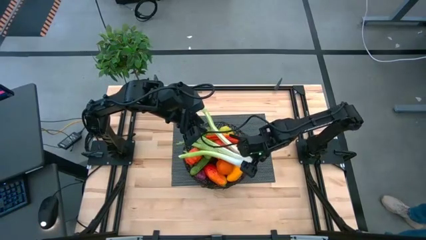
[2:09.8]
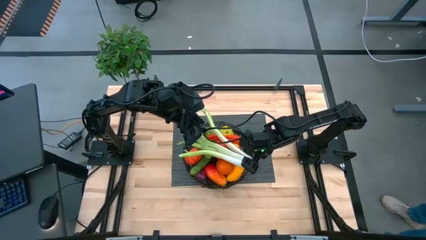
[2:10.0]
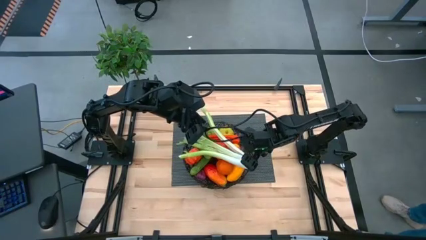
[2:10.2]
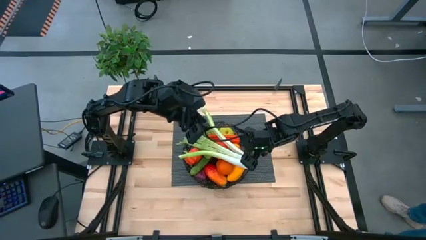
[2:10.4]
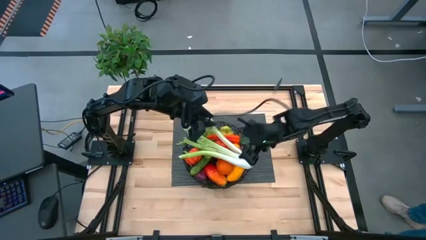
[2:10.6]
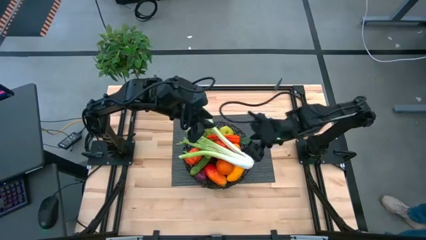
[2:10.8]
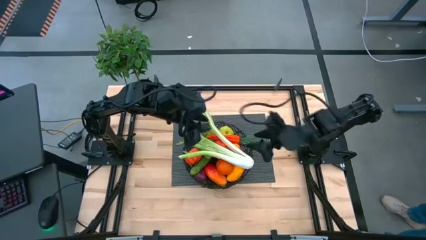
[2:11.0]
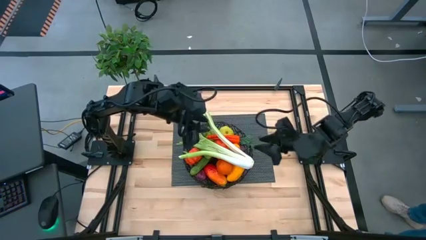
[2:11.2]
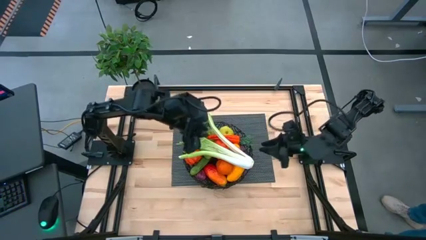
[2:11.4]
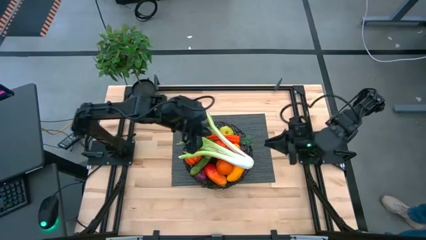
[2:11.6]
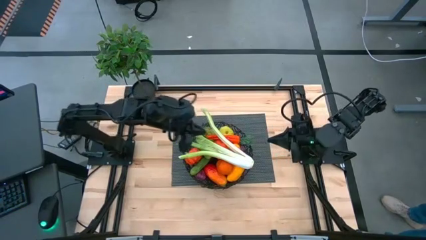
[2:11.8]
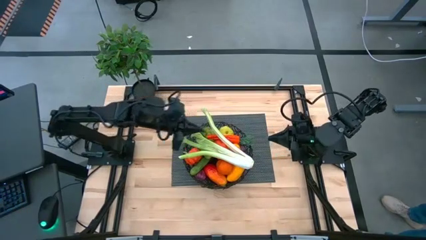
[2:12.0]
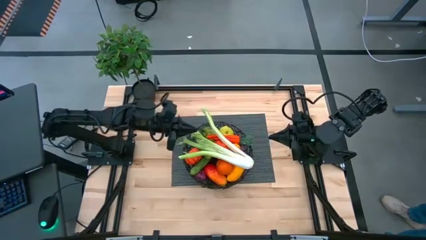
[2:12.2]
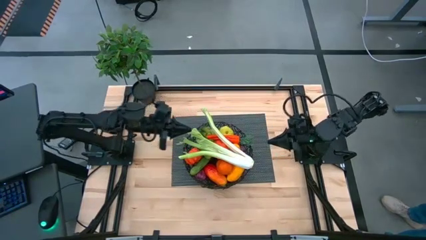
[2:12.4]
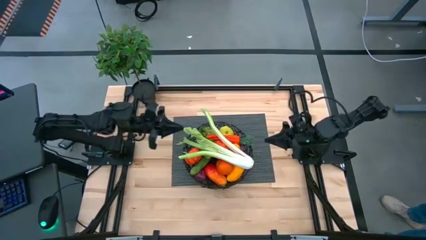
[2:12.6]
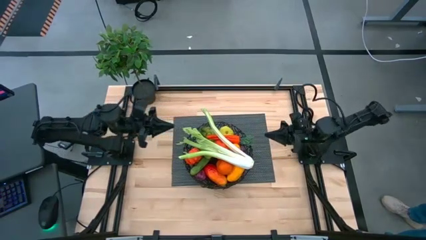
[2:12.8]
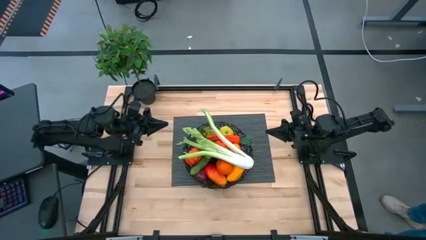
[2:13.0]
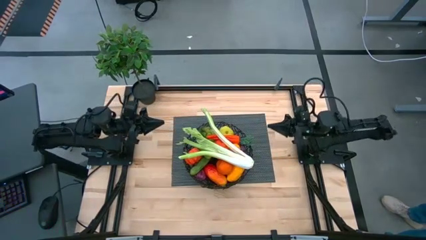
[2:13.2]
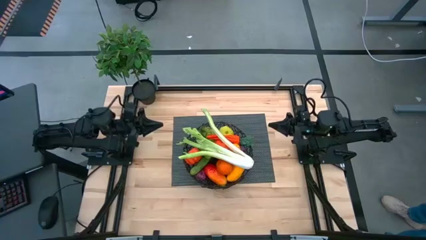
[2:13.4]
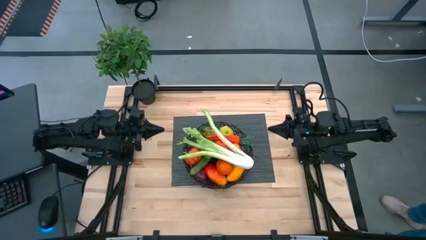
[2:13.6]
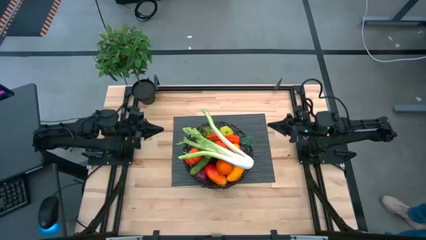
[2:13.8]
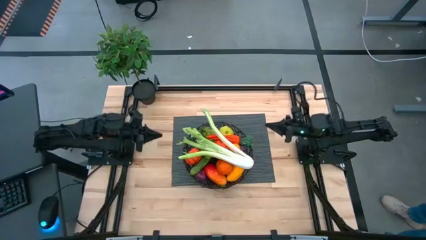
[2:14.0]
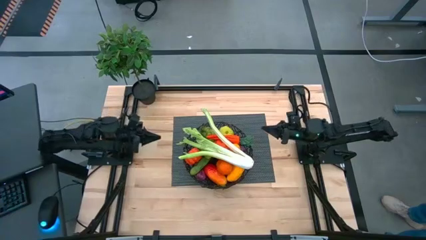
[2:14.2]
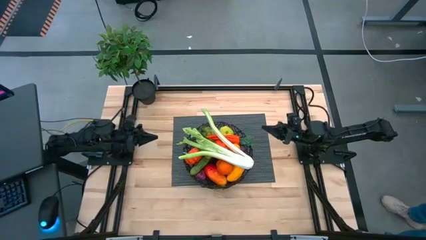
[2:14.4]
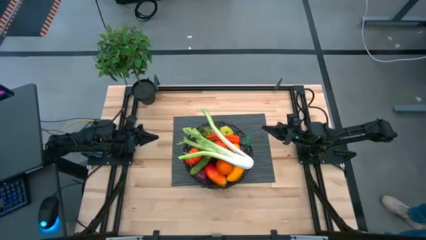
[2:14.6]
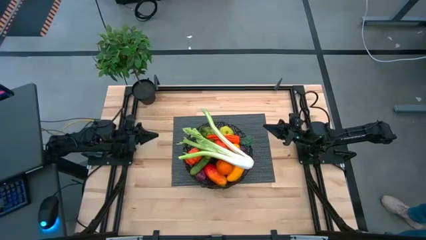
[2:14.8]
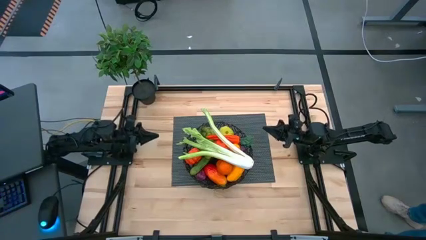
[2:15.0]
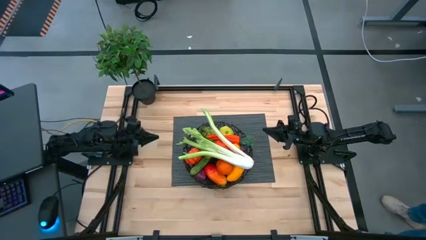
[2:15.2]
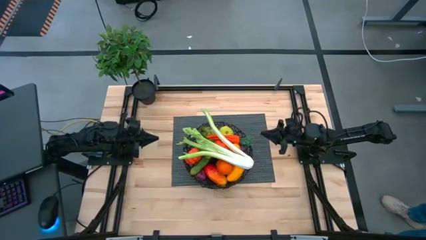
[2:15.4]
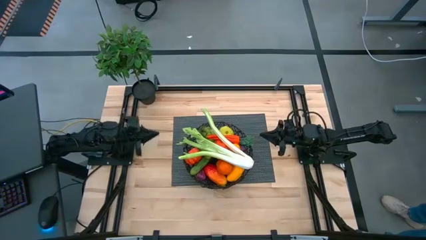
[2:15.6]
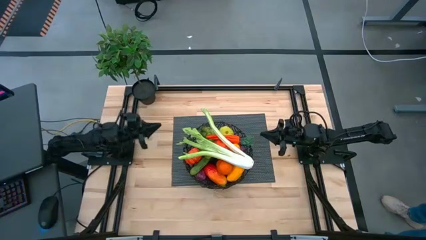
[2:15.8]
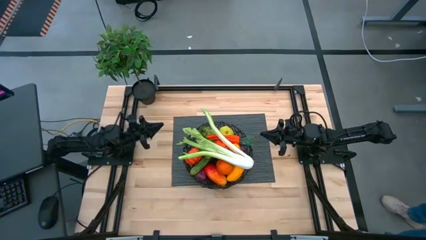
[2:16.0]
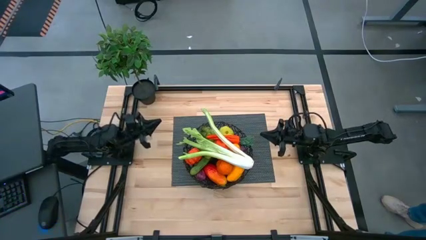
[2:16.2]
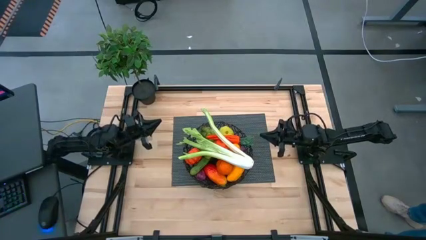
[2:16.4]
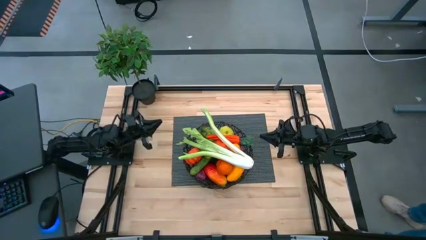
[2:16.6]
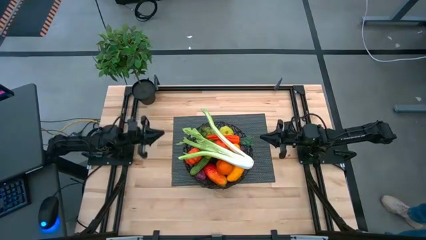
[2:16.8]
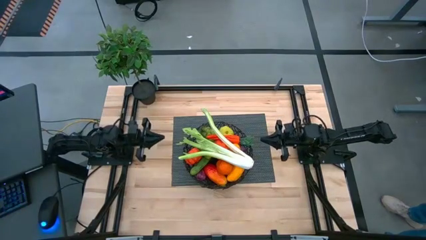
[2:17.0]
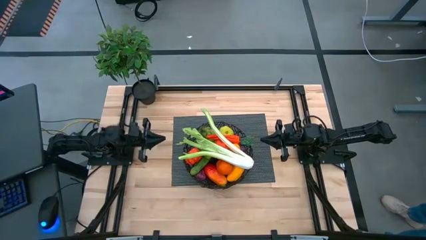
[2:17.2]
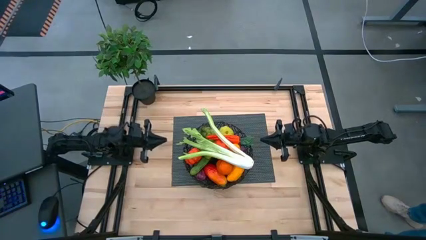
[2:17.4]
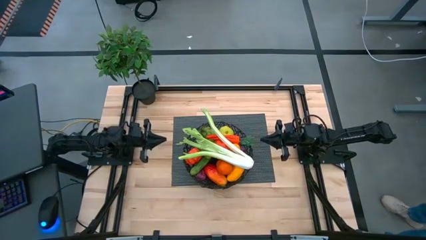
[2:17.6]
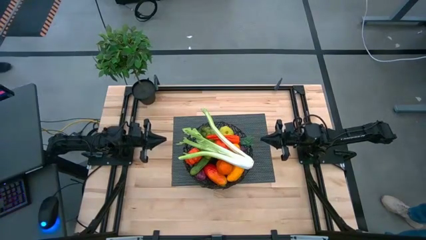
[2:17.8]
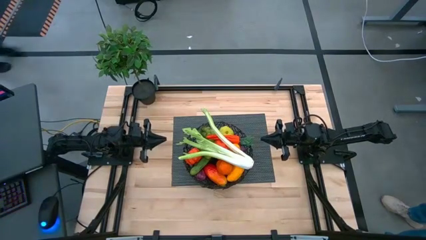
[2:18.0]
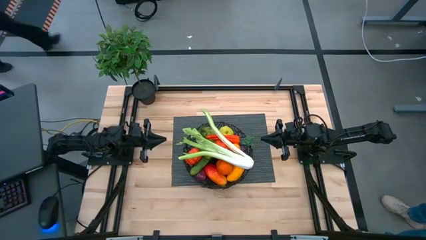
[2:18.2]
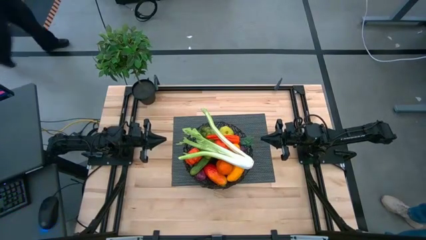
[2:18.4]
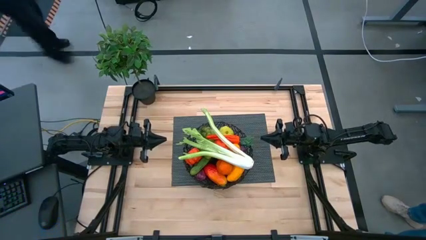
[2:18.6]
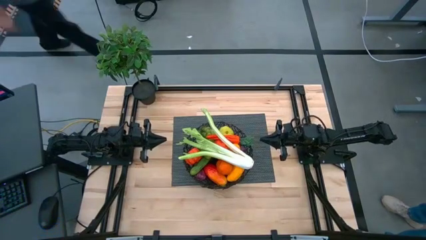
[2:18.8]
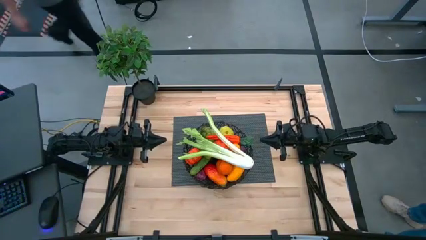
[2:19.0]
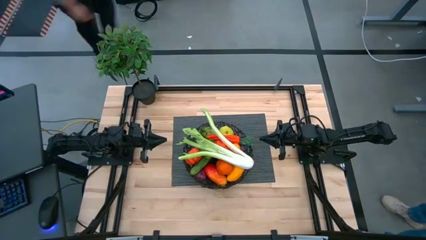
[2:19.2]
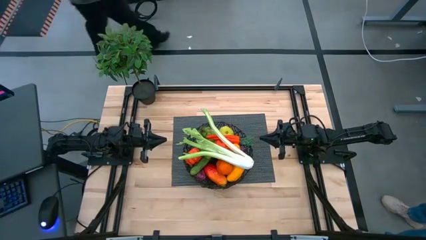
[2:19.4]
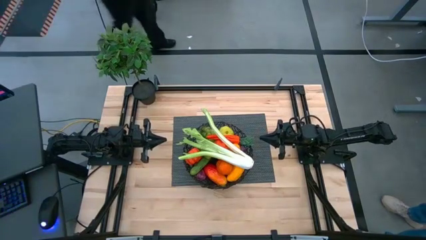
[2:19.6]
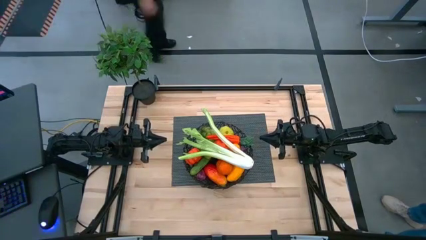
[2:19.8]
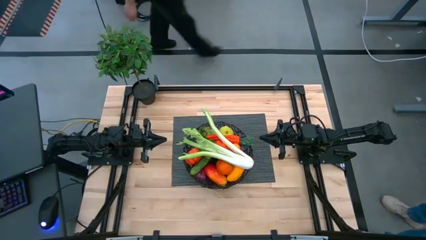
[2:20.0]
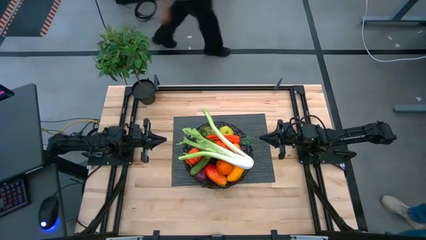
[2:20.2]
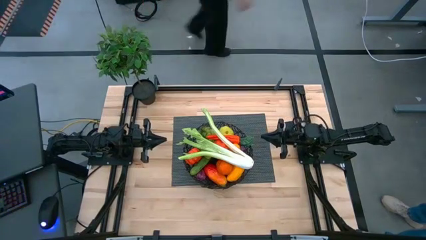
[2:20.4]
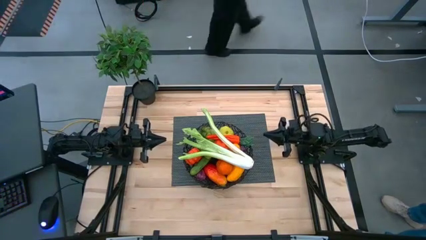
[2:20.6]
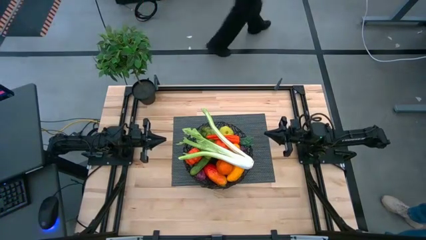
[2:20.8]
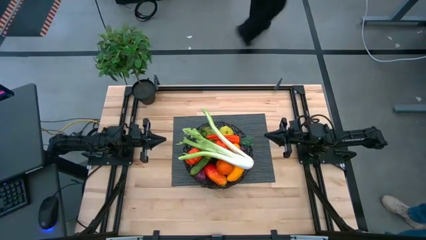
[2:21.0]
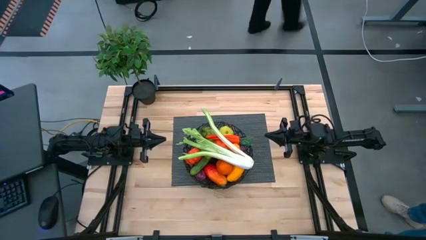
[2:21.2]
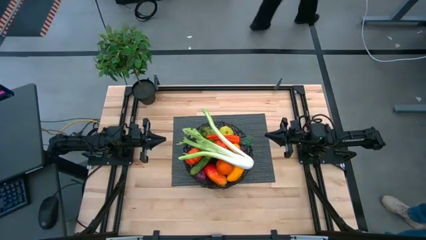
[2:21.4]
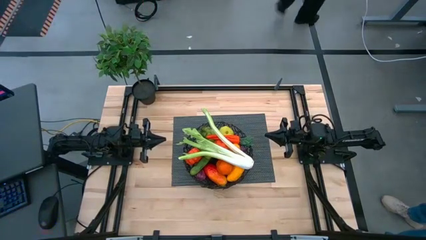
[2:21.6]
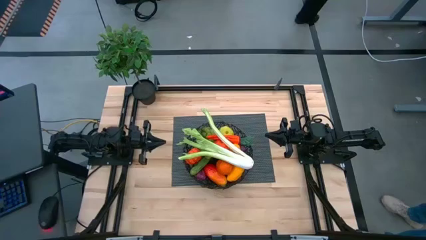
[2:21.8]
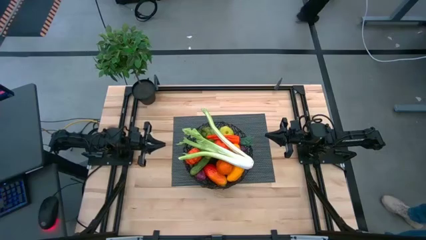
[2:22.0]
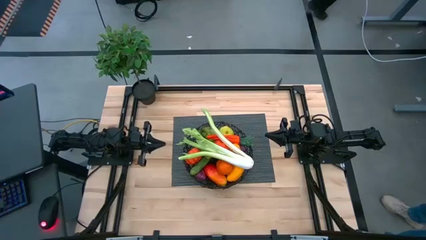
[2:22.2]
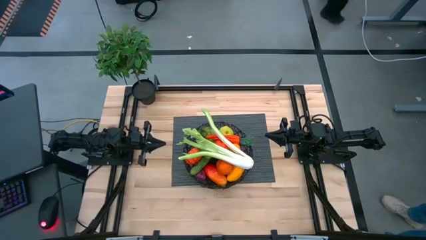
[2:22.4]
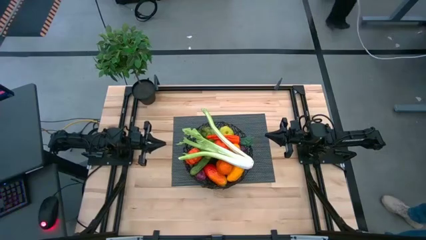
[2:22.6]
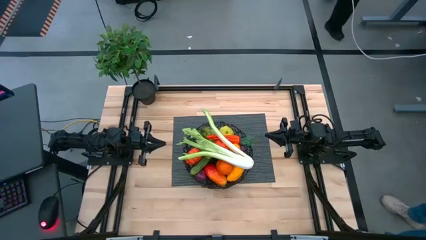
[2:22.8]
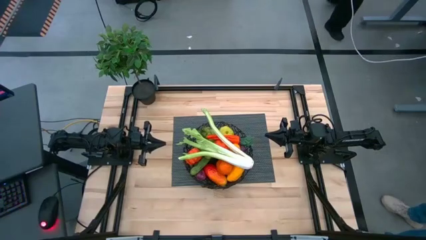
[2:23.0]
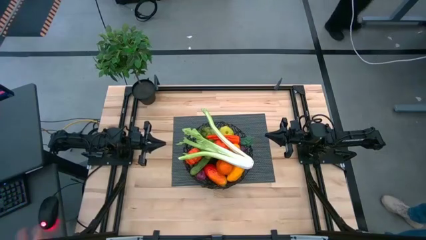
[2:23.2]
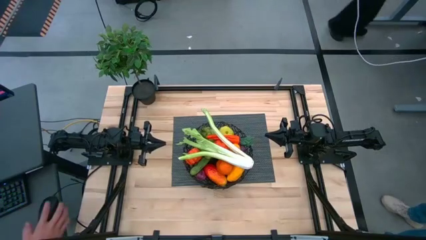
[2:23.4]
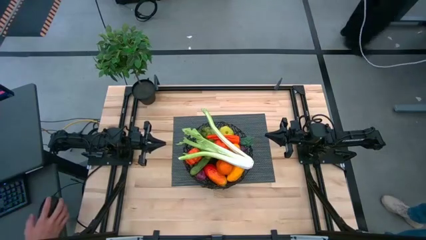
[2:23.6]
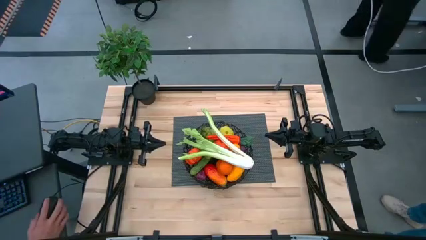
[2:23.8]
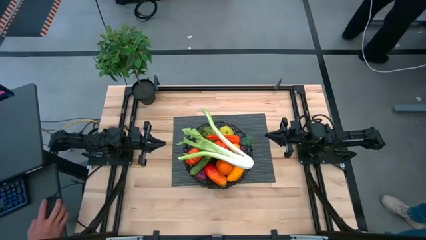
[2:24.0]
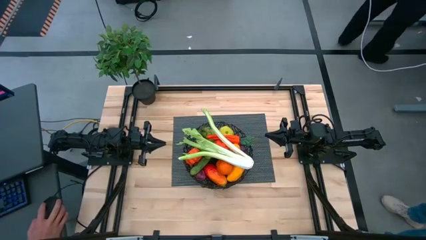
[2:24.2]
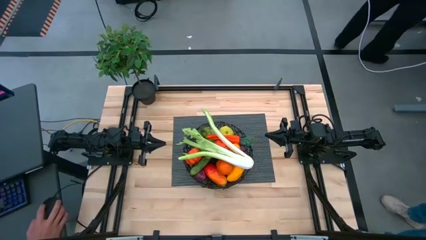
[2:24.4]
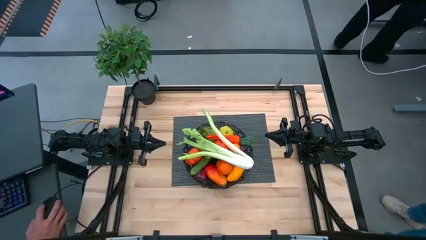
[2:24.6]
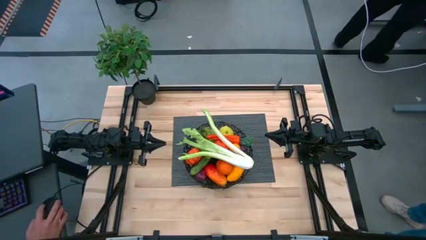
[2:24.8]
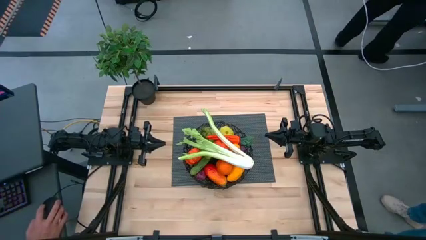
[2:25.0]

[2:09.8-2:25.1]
Task: Build produce basket
Return to Home Position
